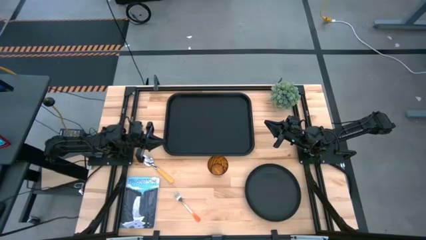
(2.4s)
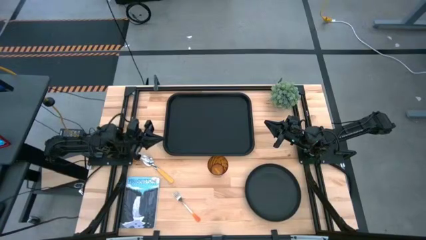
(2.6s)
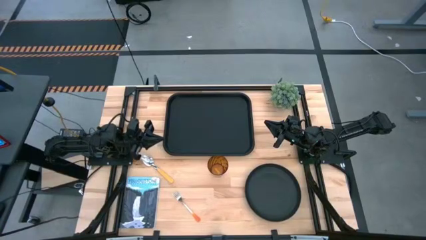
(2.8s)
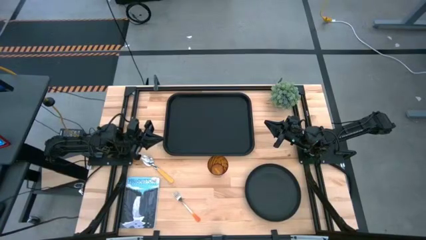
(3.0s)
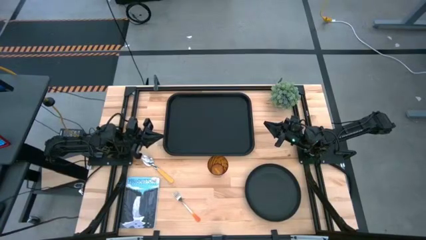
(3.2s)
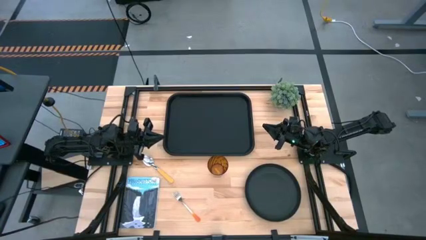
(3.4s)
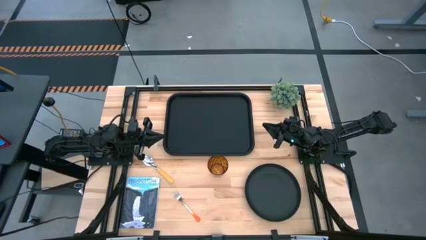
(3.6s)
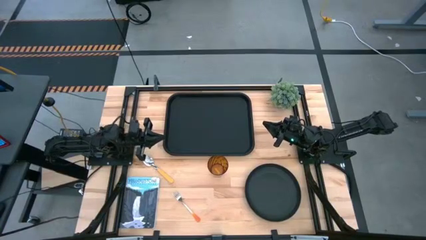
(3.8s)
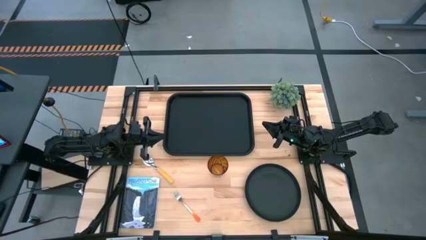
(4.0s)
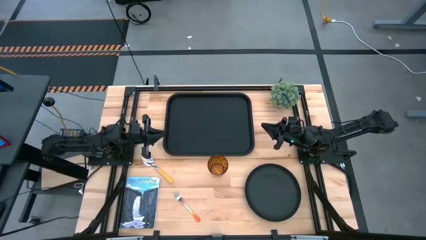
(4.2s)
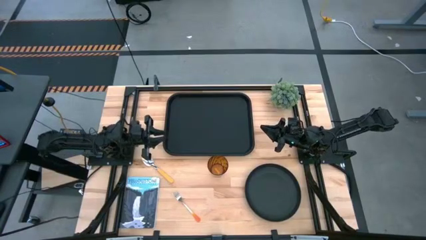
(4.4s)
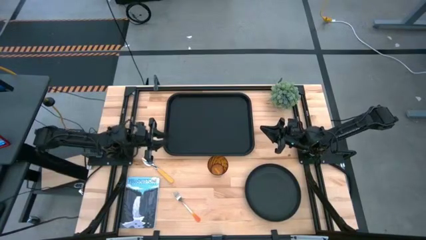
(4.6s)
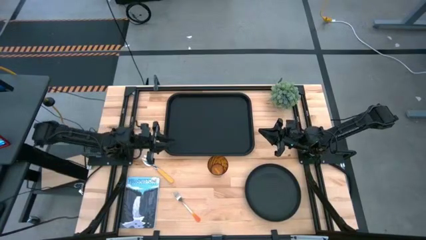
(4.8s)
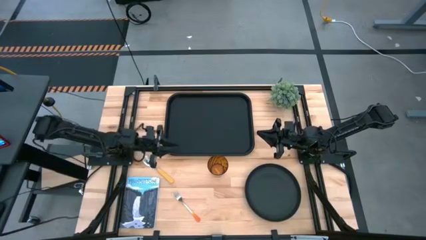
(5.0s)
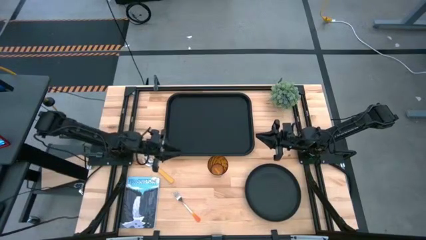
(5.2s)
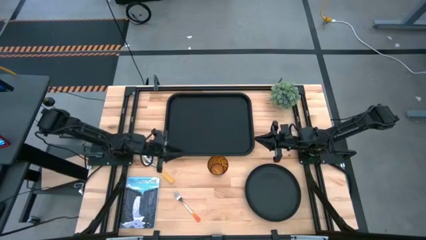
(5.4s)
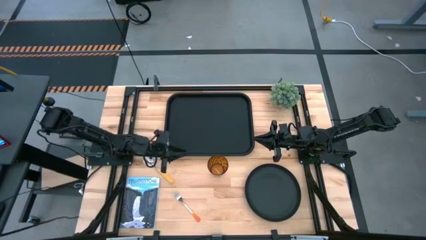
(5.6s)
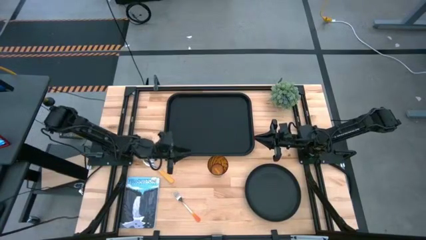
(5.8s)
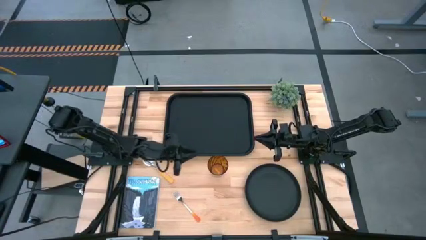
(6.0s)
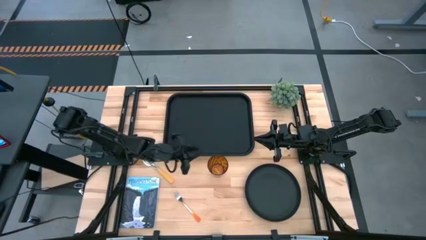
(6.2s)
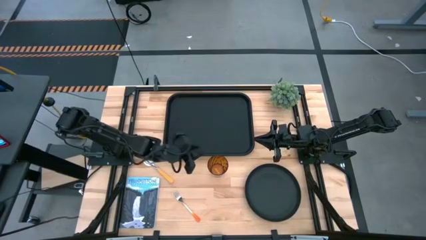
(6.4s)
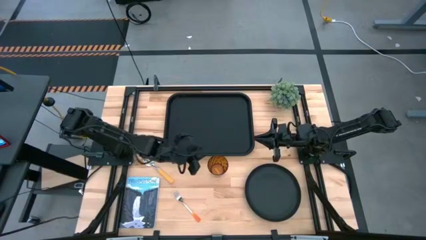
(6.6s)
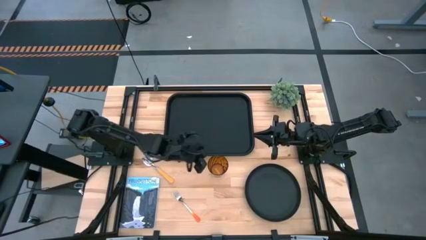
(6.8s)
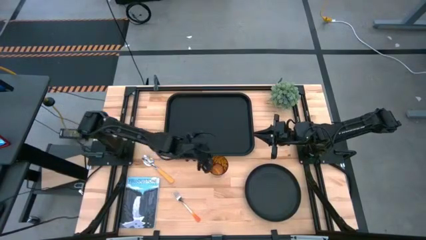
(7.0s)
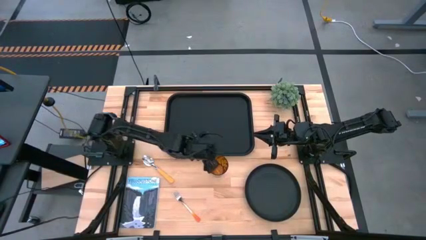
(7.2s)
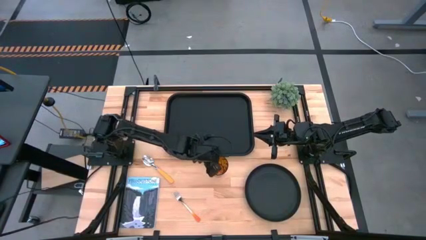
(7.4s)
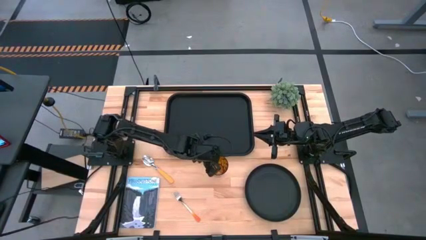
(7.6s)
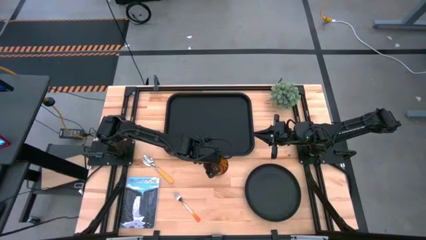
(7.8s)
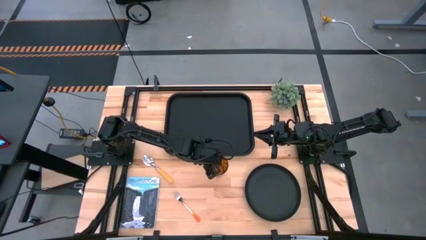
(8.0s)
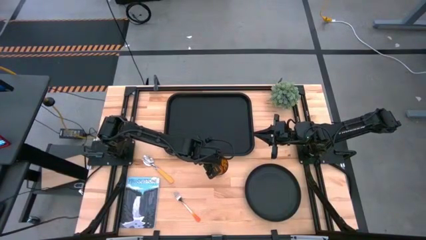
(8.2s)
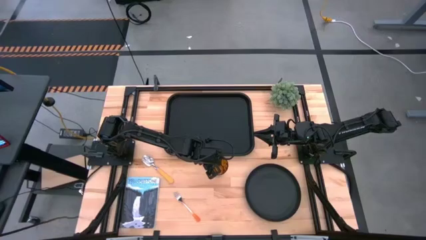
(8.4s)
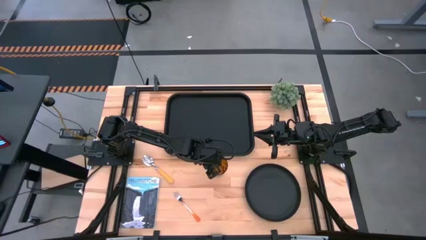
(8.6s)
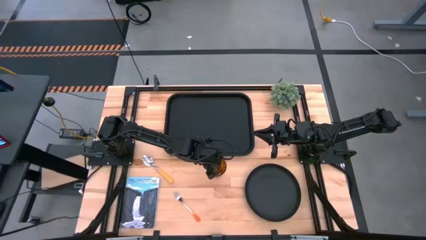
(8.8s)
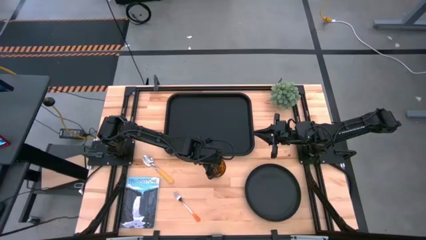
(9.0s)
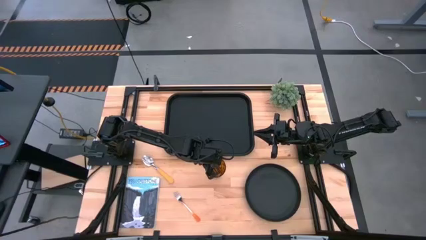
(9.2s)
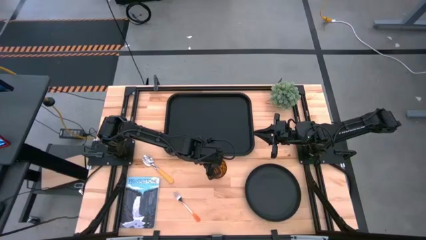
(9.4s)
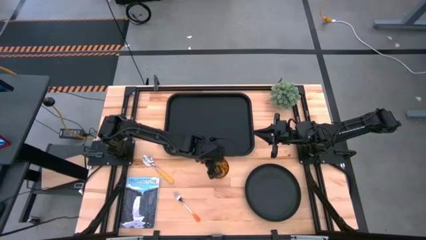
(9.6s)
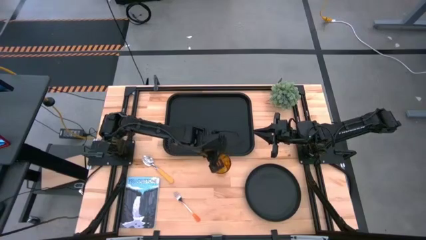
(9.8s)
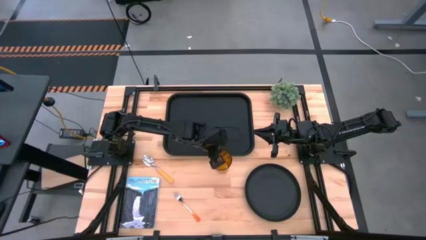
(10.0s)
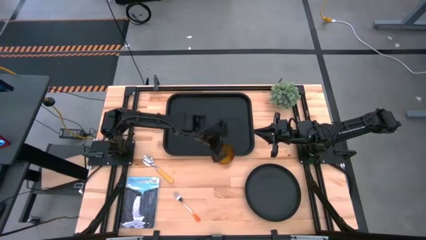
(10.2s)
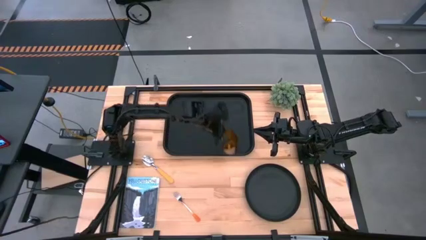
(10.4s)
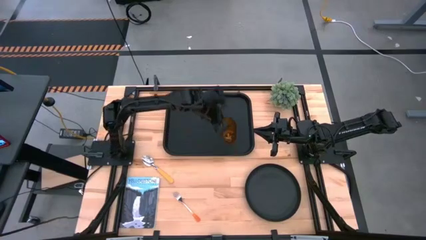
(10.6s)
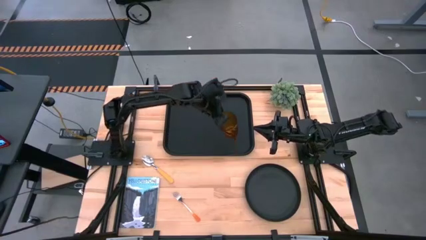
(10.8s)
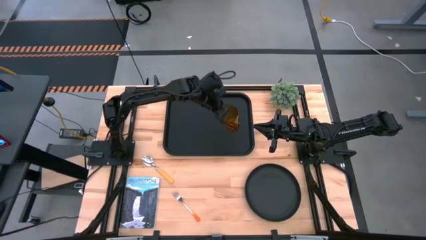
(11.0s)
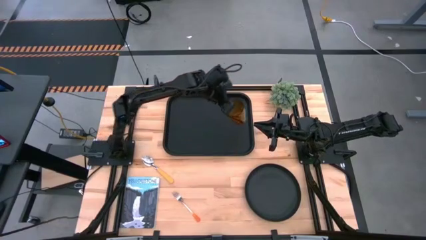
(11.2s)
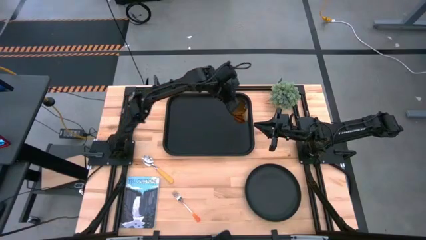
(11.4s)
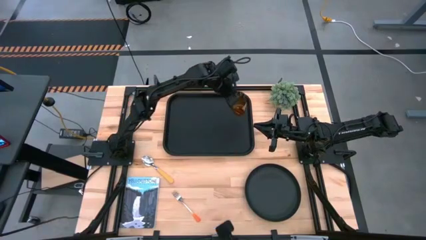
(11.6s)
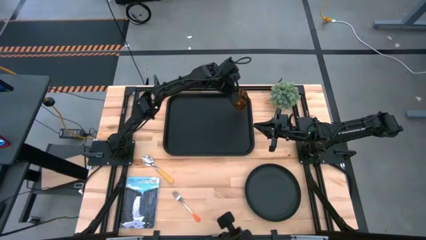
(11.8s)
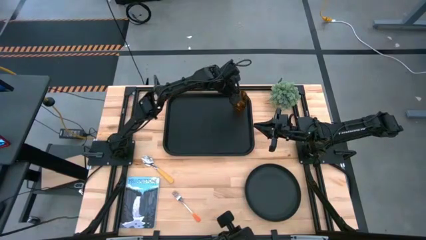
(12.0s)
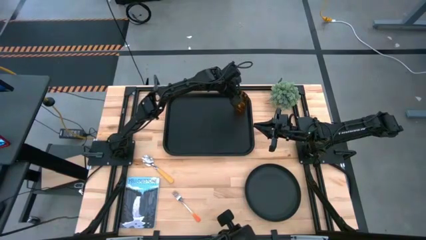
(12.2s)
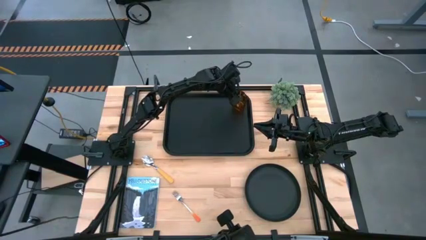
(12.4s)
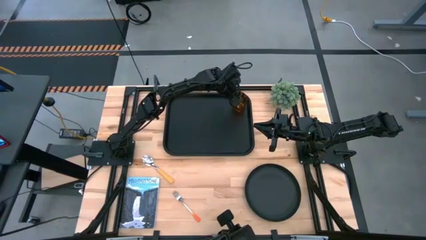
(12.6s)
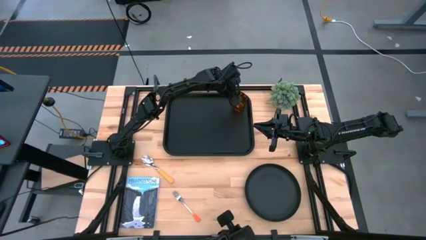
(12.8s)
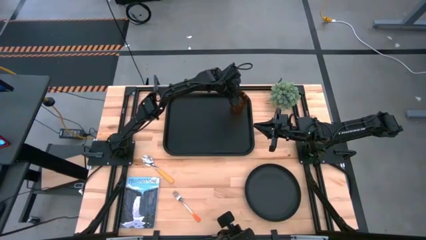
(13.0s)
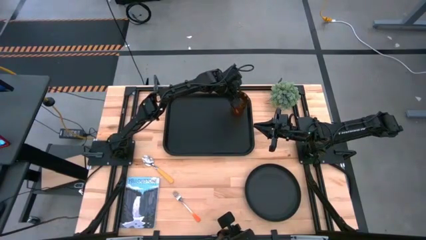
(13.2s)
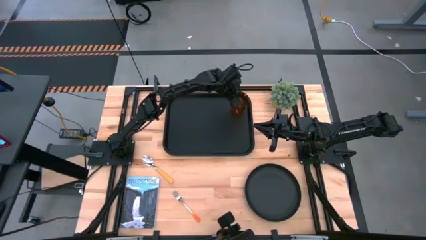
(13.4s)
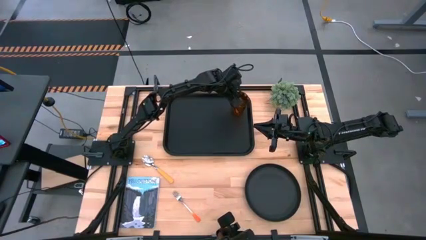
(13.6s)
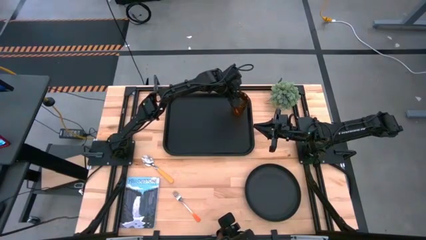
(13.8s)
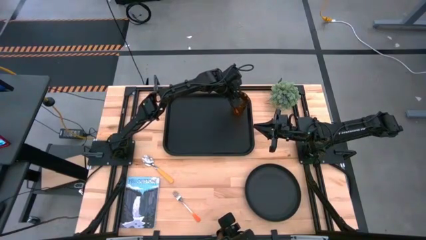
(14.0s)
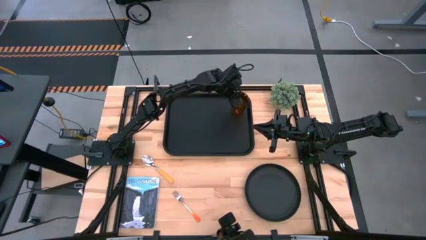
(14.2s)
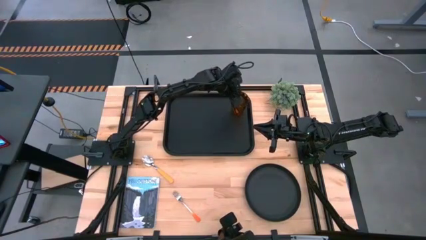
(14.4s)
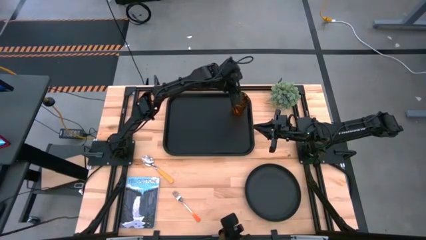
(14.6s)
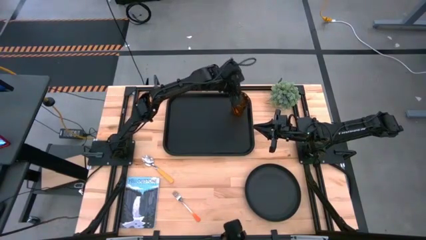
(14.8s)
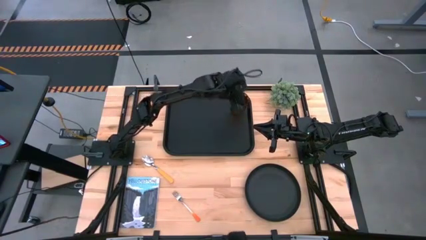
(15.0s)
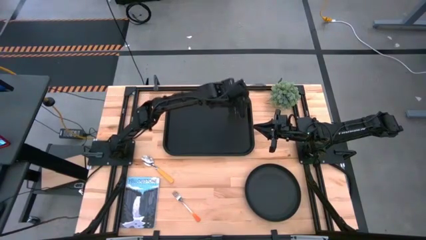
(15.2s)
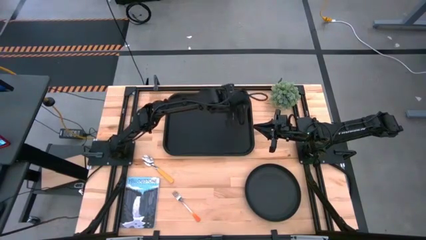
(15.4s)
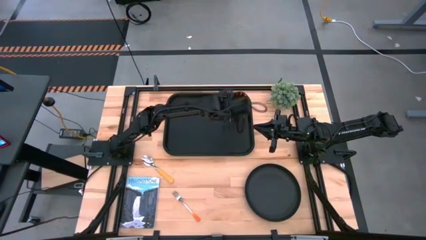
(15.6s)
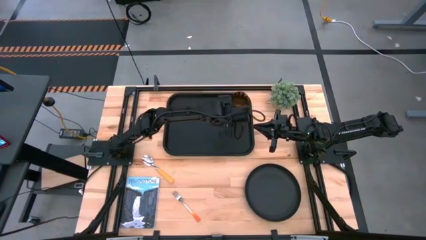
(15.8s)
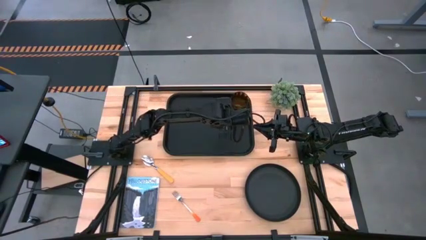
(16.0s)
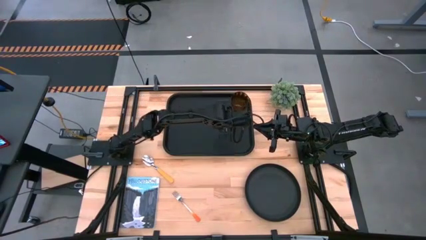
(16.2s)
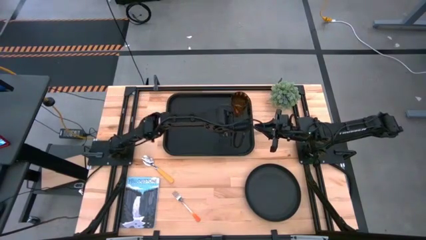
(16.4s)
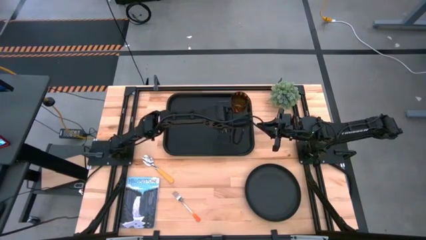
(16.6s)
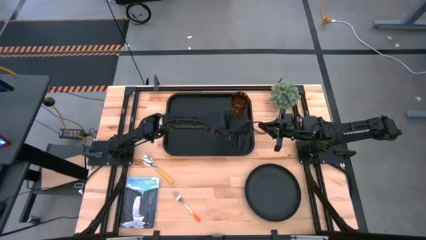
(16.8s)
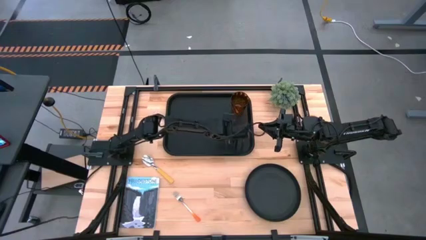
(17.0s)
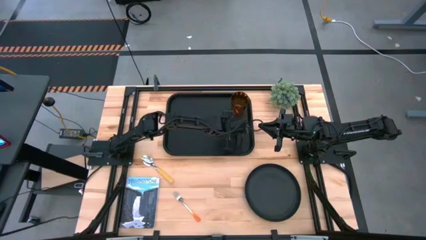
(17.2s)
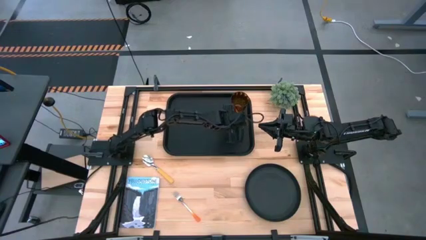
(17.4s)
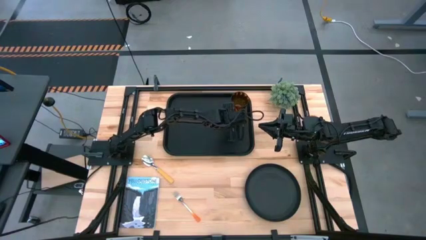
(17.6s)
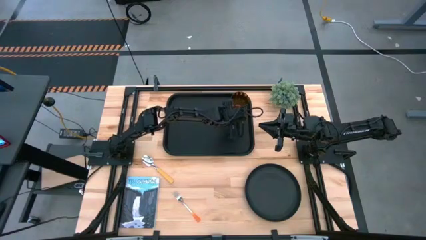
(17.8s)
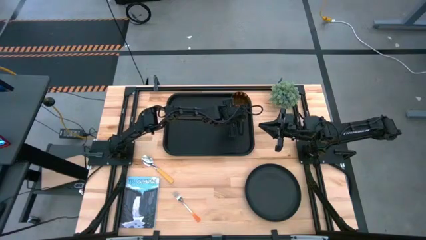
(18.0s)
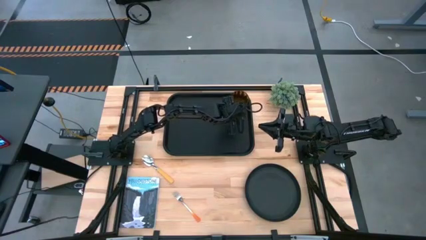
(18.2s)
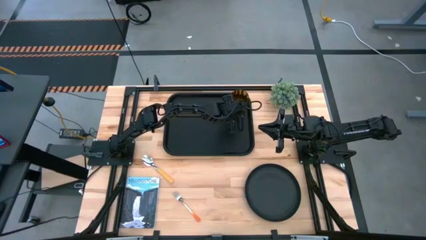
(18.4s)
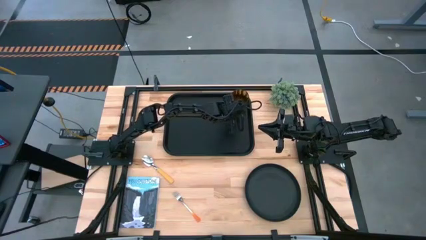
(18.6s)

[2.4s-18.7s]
Task: Pick and place plate/cup/fork/spoon on tray
Put the brown glass on the black tray
